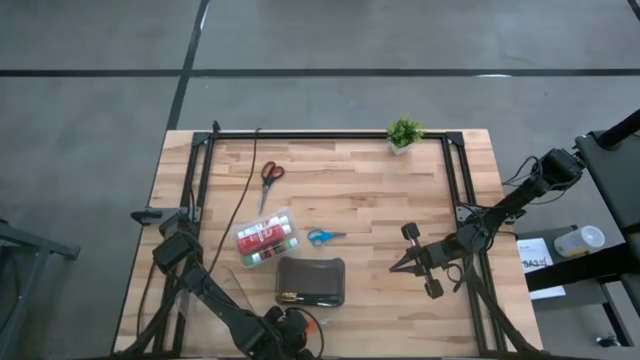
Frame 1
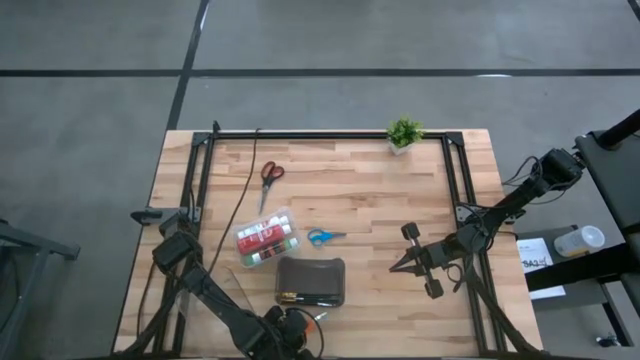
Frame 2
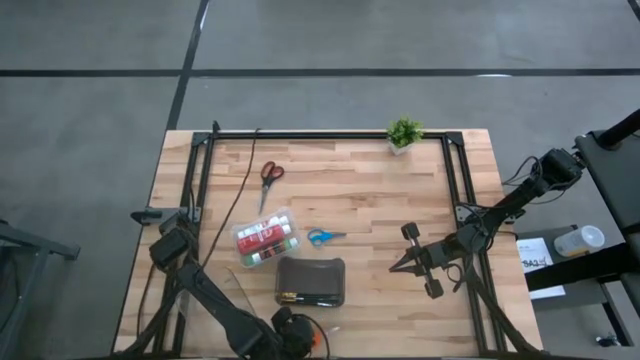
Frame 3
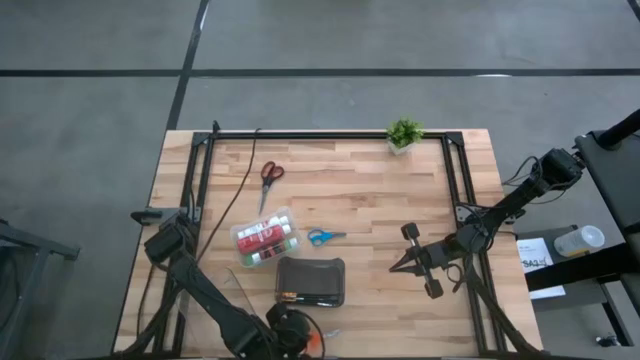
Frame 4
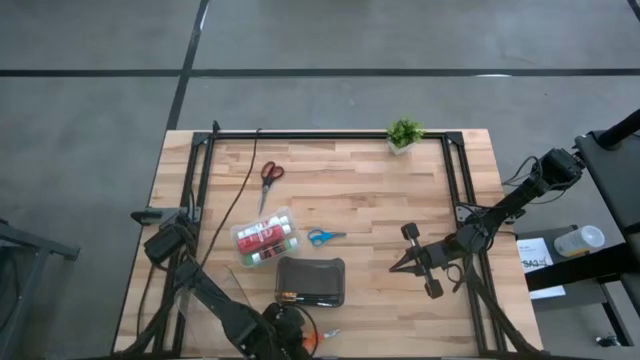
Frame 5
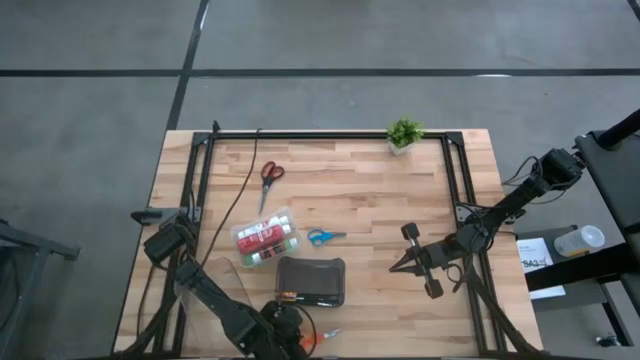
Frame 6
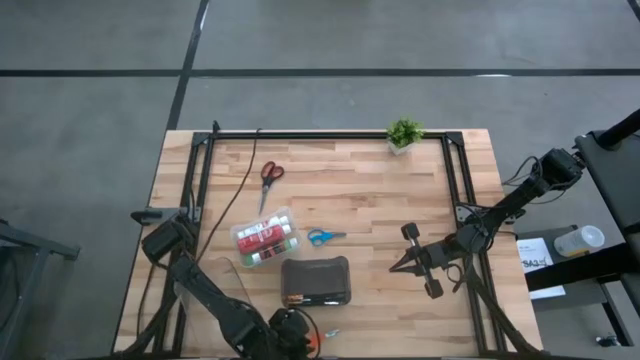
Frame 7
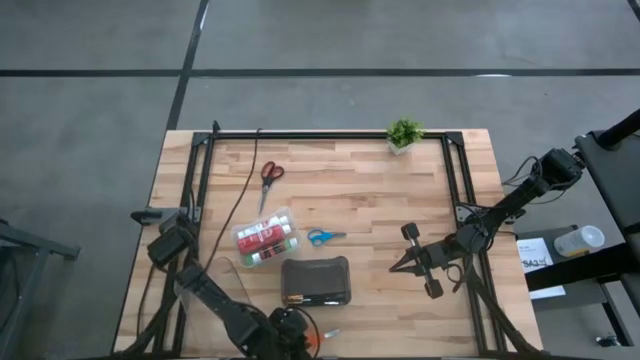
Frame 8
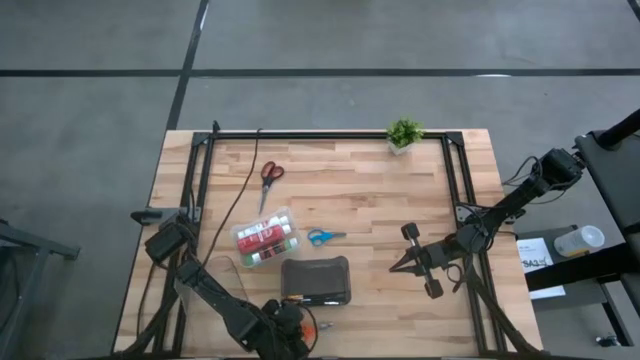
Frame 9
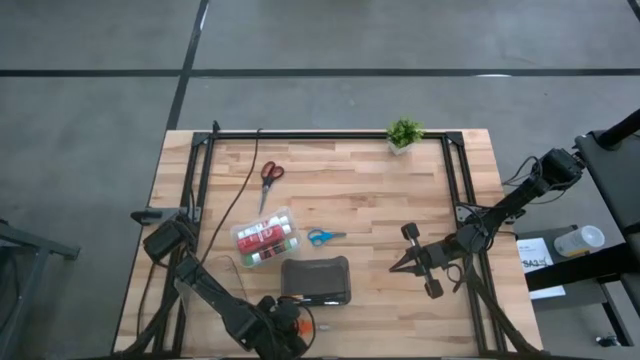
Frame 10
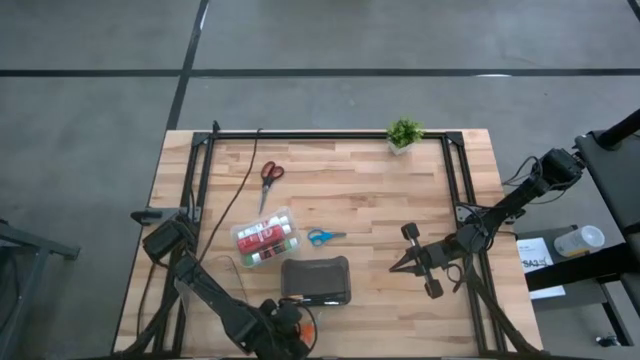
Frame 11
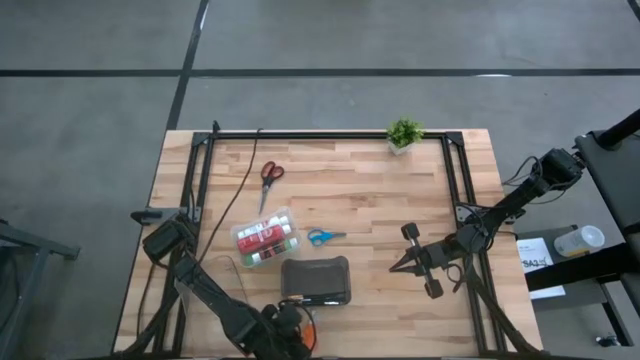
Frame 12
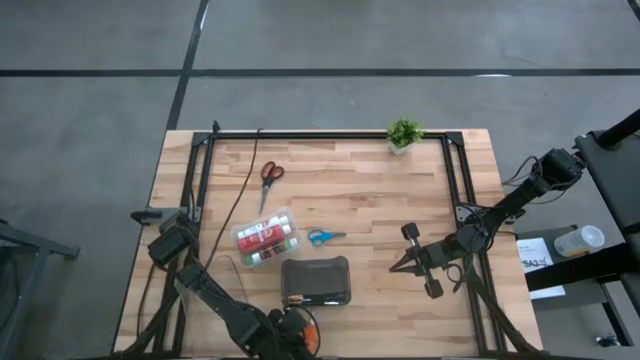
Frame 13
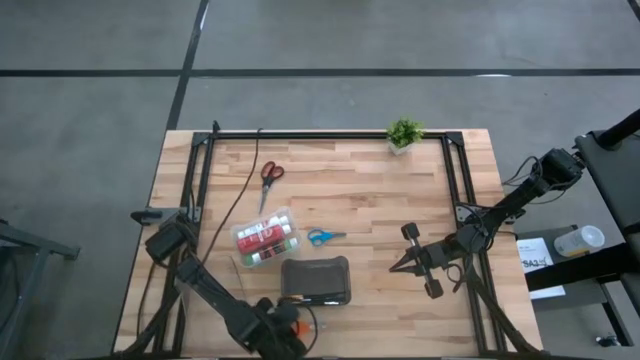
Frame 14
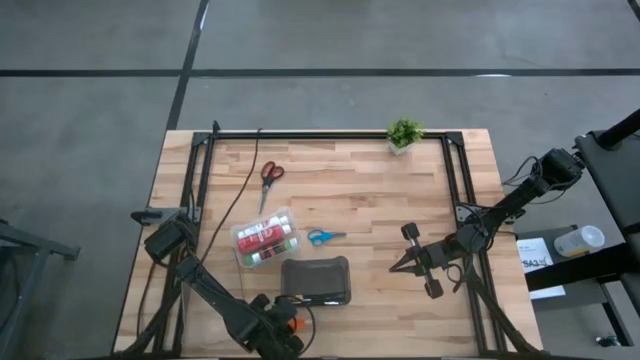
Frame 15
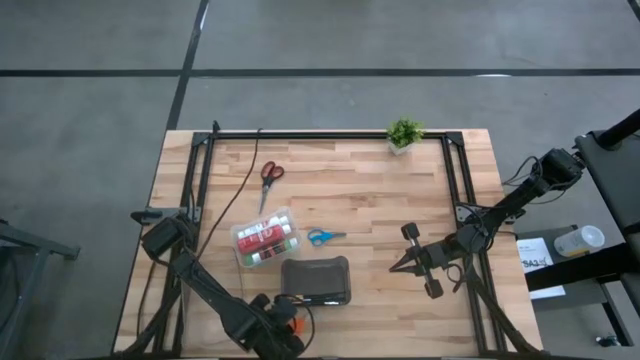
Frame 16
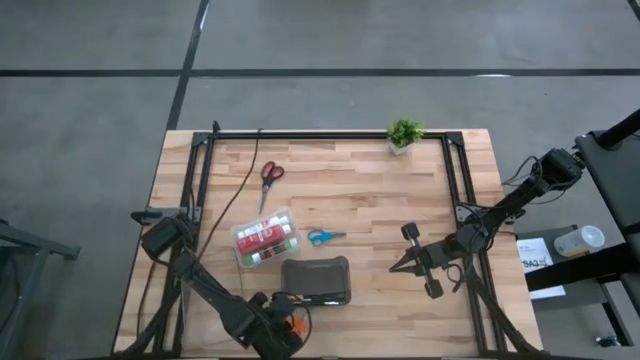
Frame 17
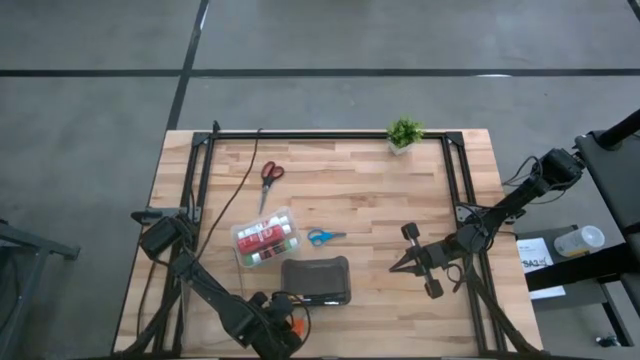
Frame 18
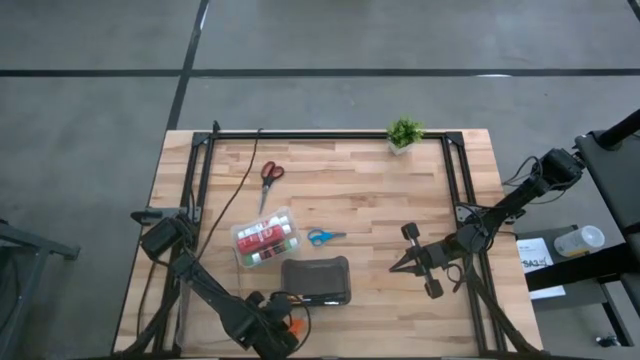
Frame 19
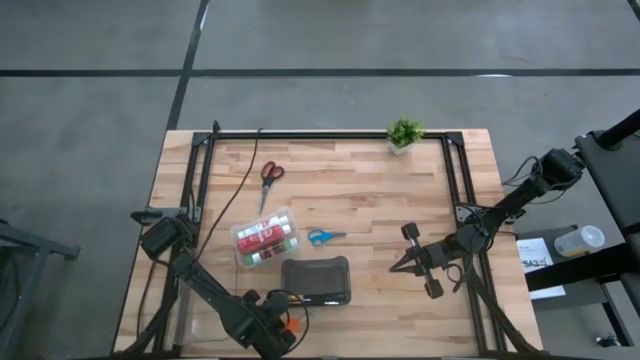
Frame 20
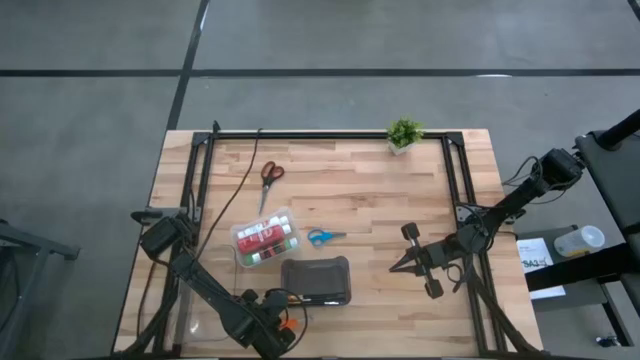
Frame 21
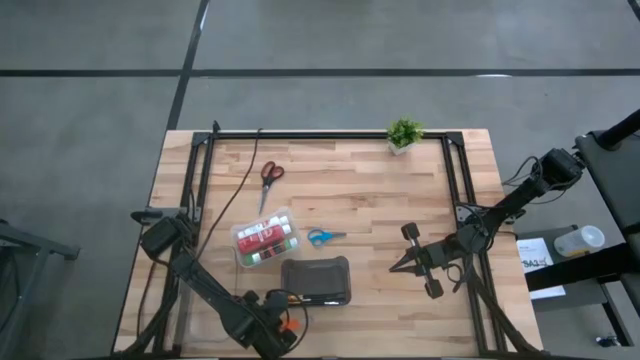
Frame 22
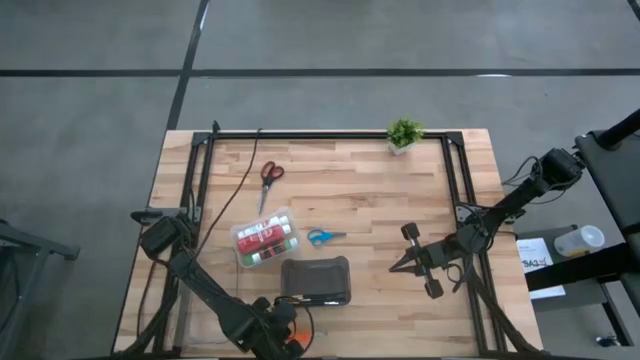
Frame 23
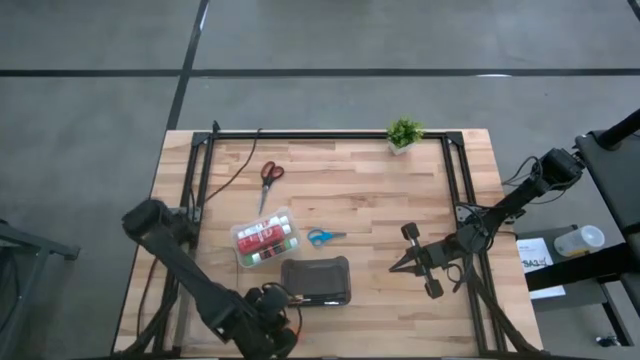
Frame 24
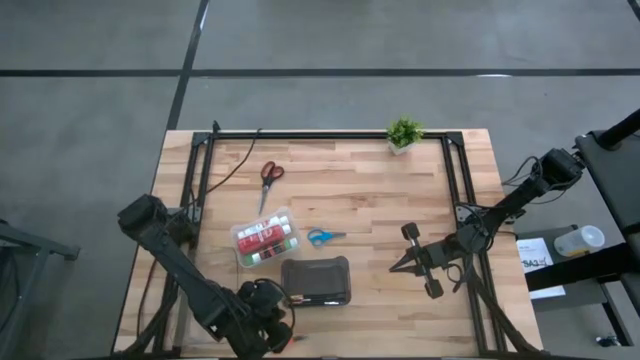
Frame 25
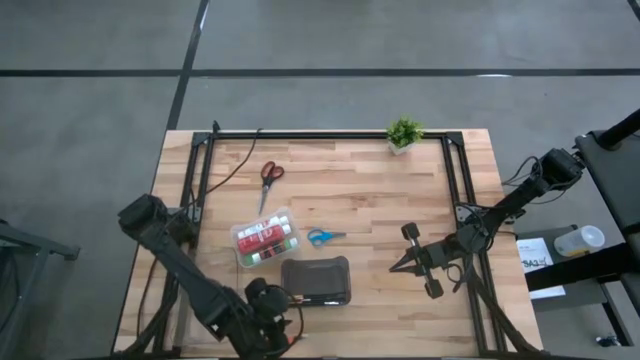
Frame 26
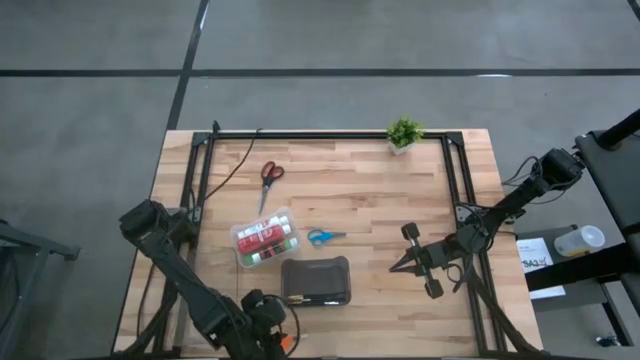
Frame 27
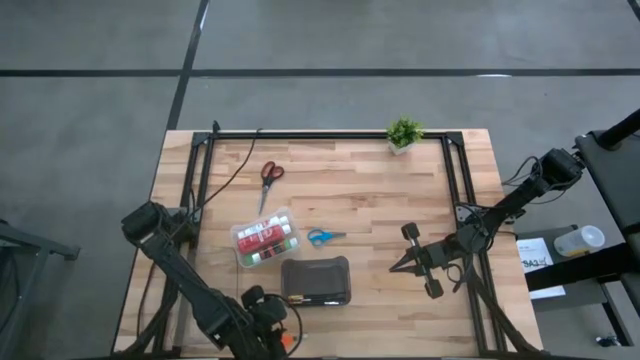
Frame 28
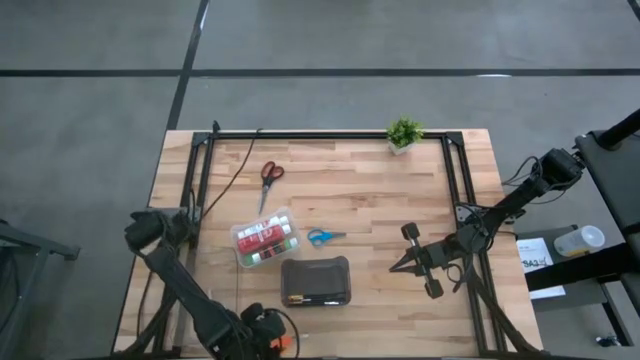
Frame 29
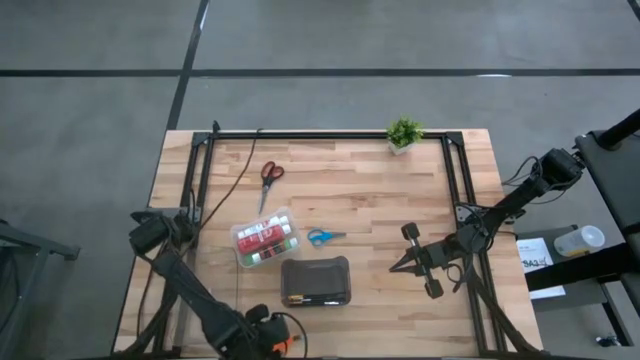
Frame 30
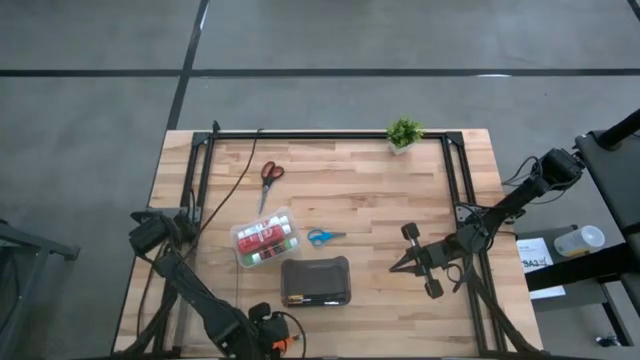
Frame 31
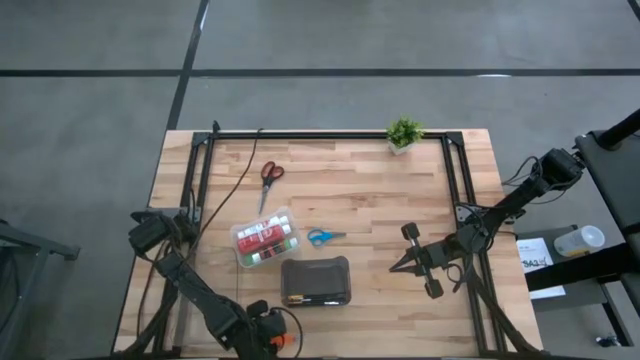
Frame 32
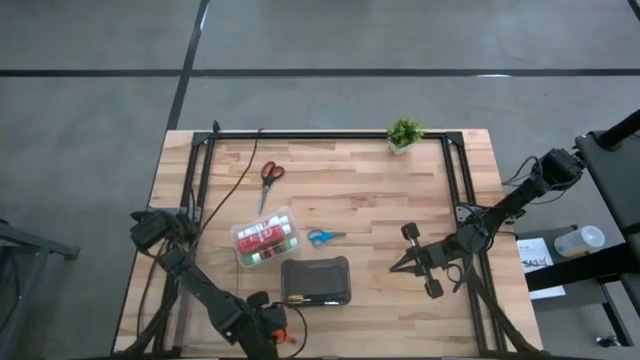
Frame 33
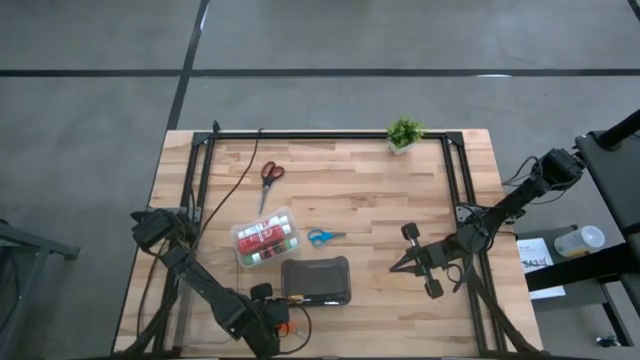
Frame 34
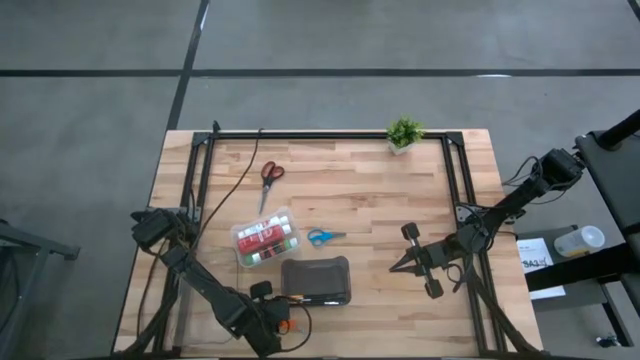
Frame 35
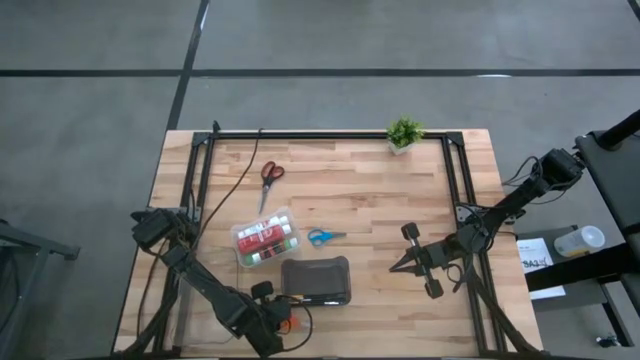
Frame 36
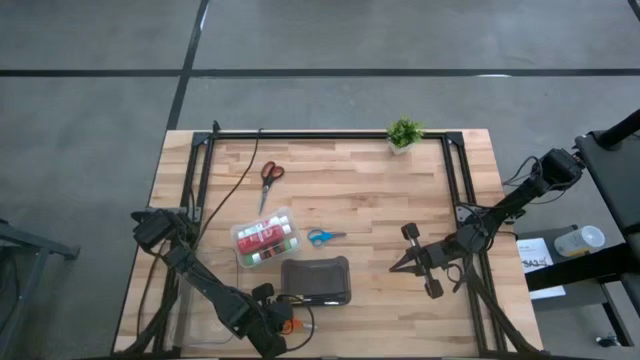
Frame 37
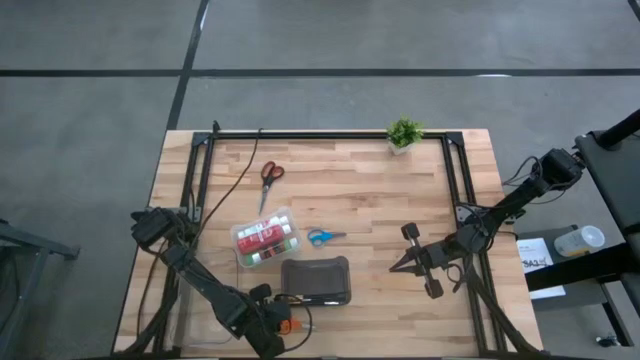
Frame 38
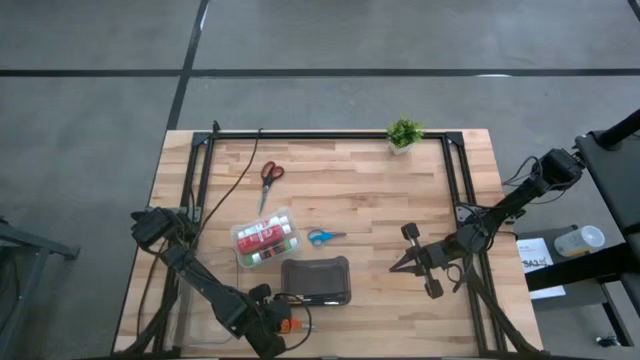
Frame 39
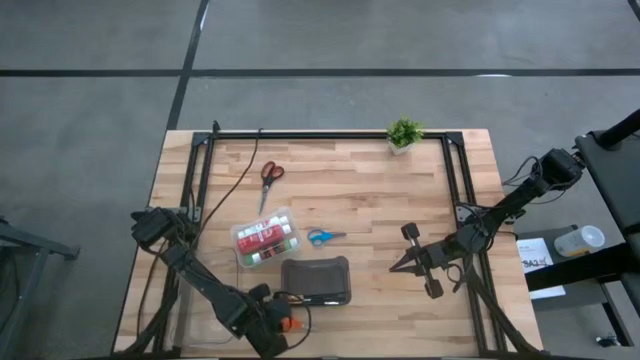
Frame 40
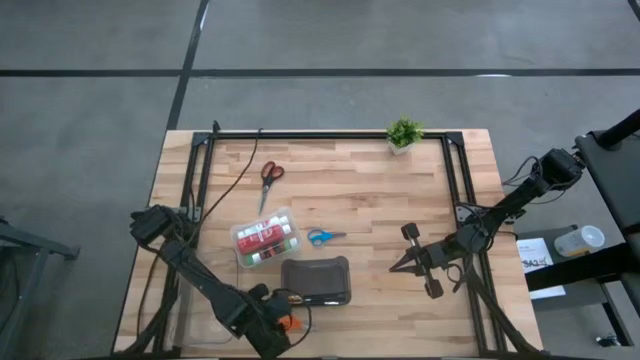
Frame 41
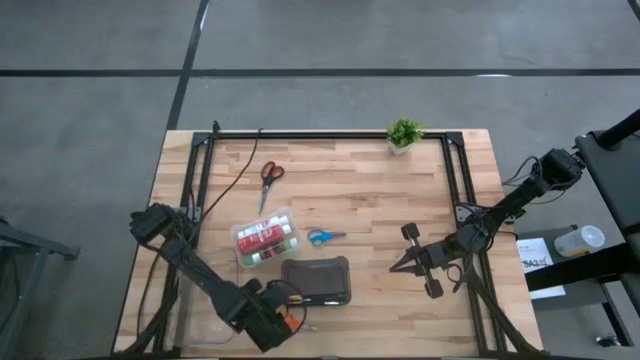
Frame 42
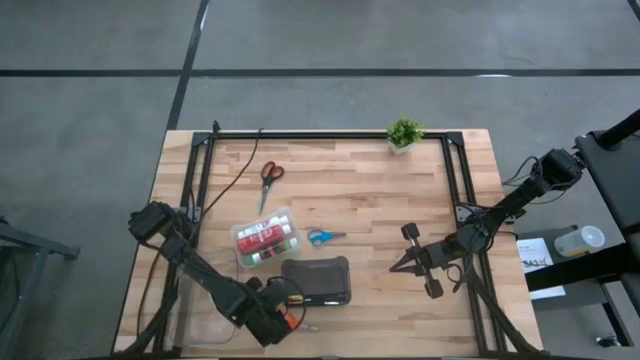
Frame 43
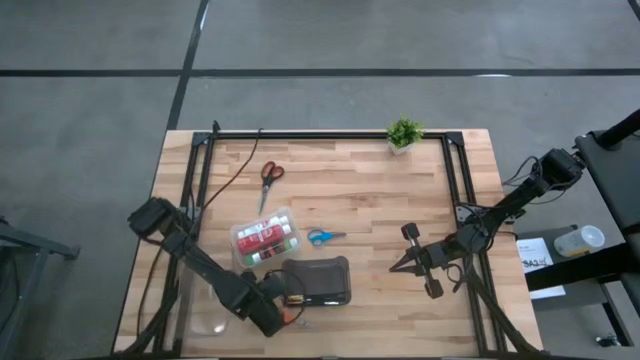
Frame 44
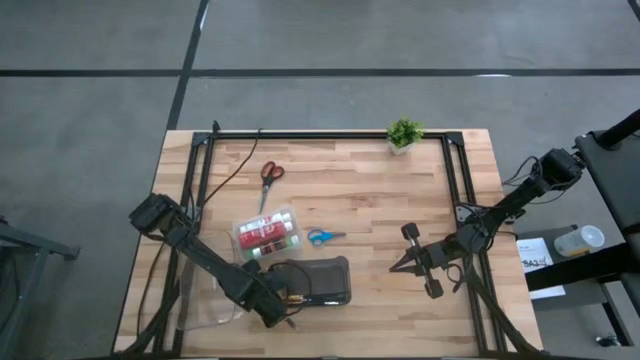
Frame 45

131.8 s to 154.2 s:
Task: Pick & Place Paint Supplies
Put the orange scissors into the bottom transparent bin
